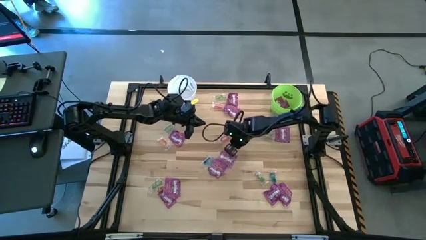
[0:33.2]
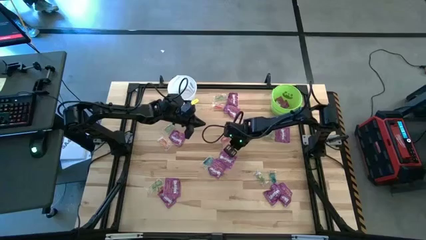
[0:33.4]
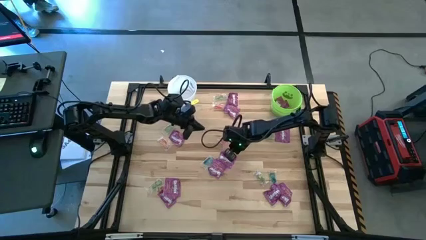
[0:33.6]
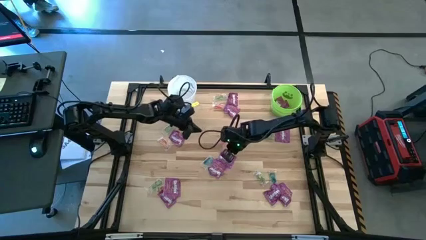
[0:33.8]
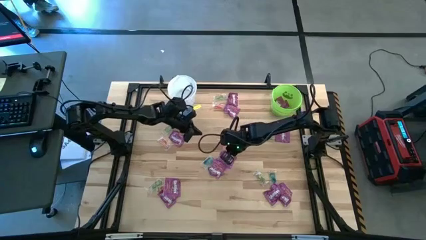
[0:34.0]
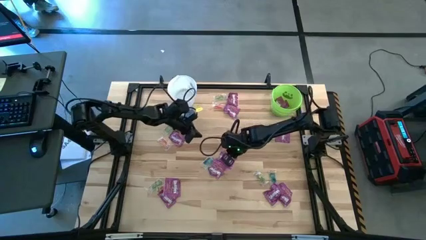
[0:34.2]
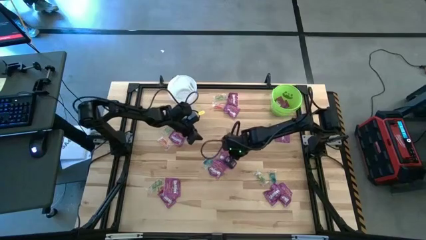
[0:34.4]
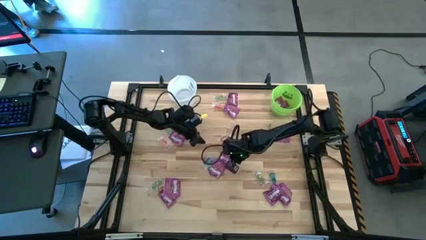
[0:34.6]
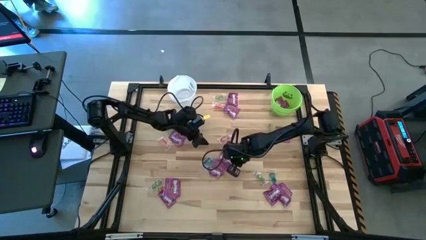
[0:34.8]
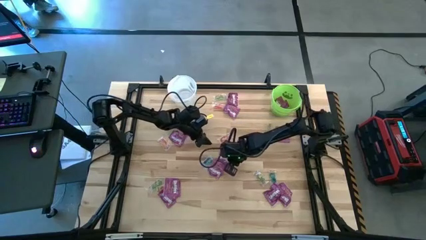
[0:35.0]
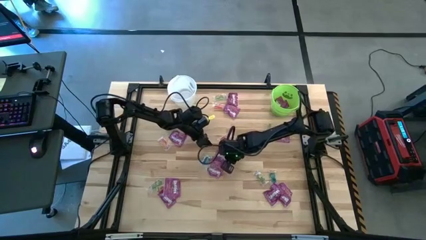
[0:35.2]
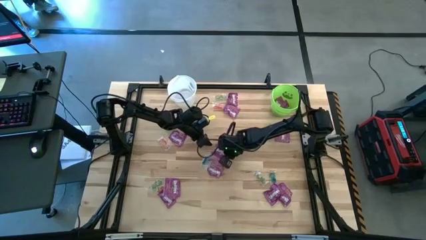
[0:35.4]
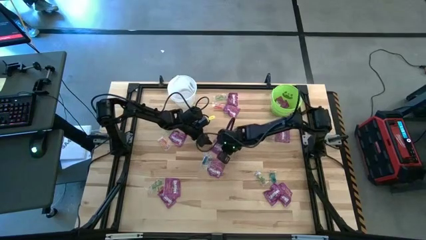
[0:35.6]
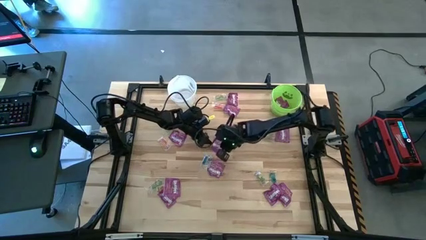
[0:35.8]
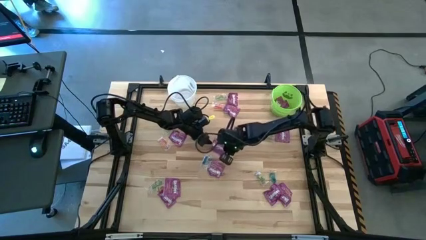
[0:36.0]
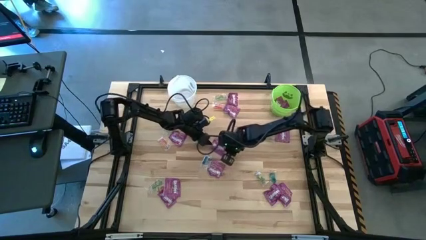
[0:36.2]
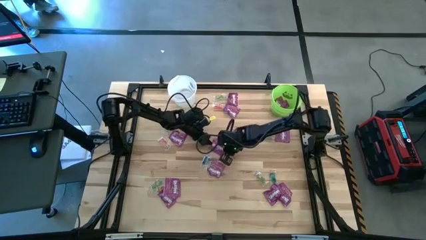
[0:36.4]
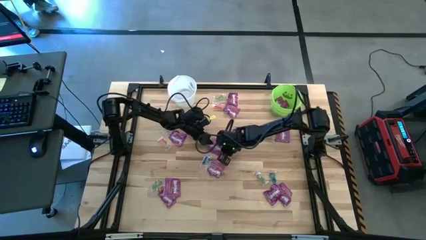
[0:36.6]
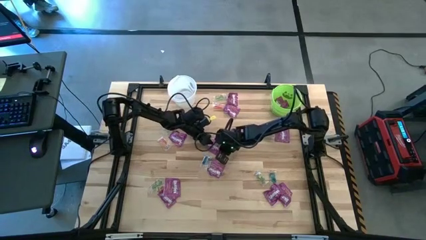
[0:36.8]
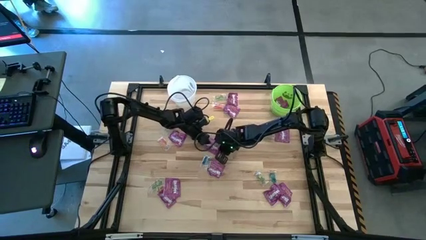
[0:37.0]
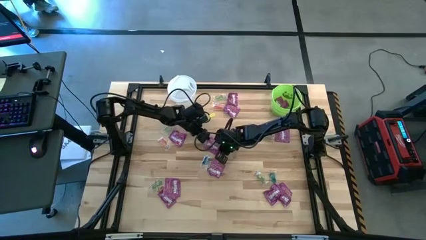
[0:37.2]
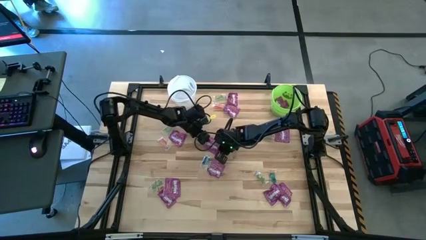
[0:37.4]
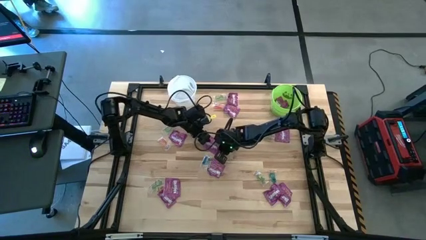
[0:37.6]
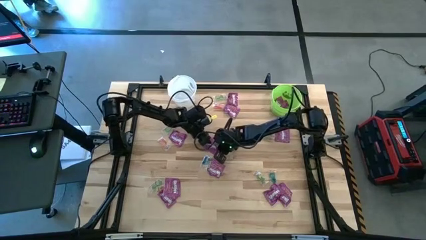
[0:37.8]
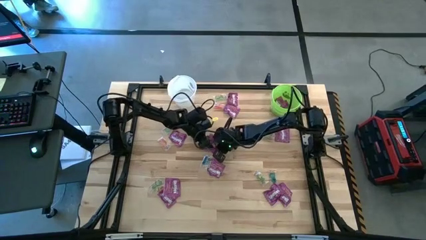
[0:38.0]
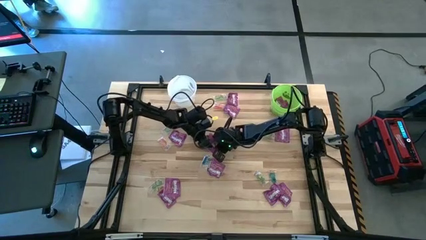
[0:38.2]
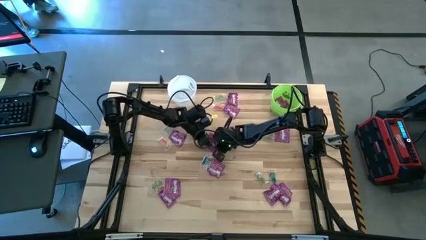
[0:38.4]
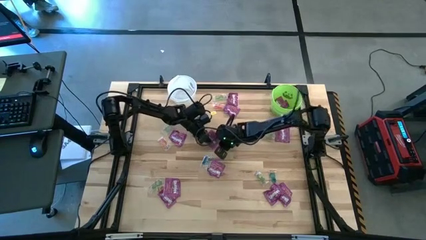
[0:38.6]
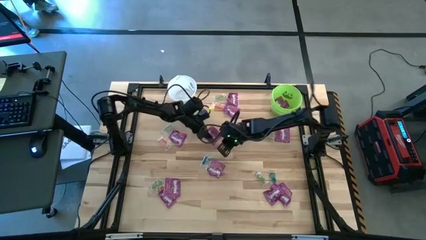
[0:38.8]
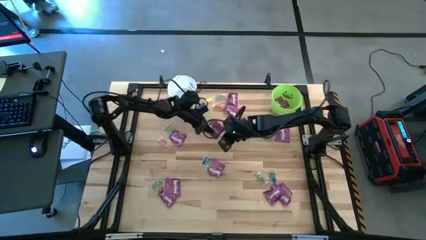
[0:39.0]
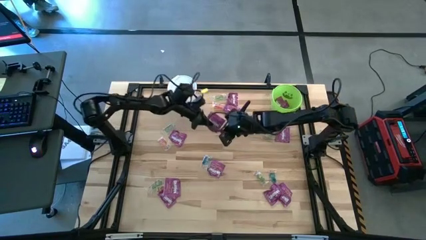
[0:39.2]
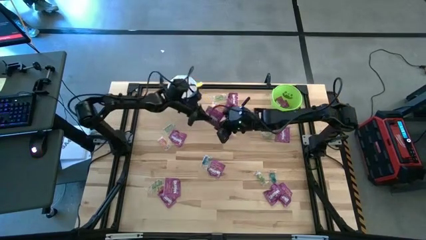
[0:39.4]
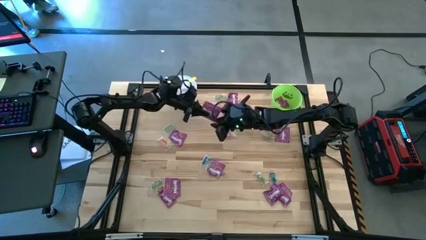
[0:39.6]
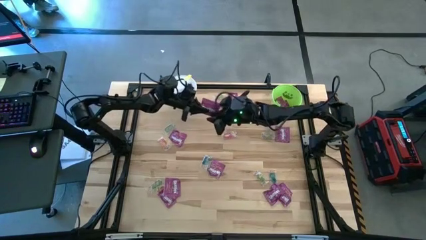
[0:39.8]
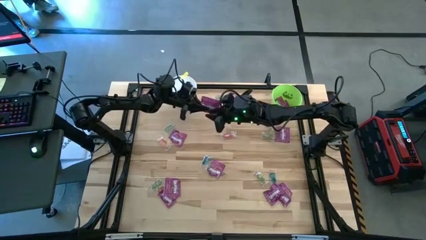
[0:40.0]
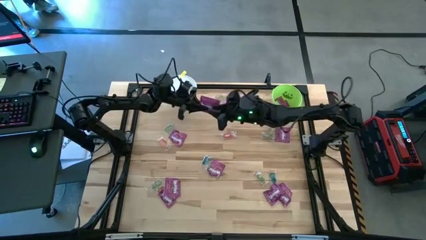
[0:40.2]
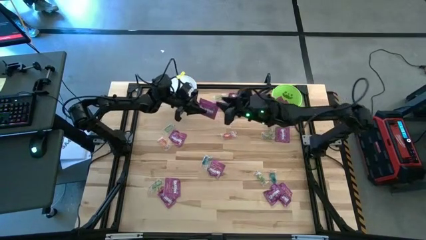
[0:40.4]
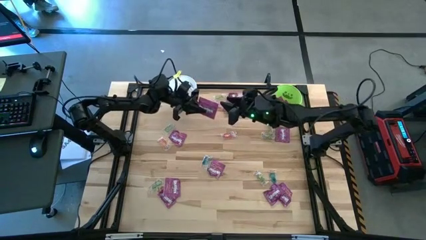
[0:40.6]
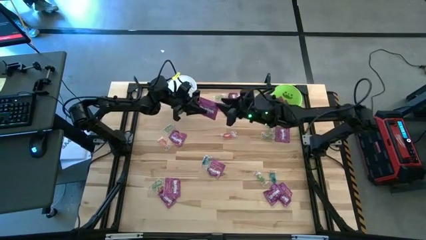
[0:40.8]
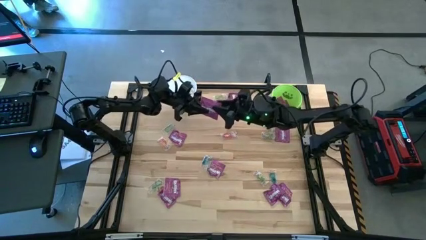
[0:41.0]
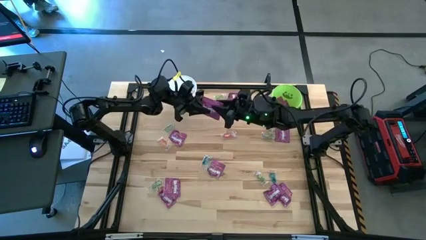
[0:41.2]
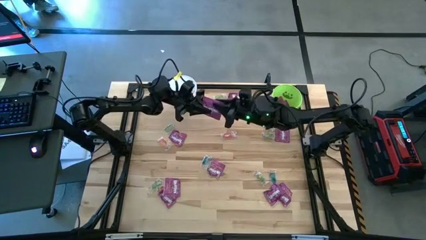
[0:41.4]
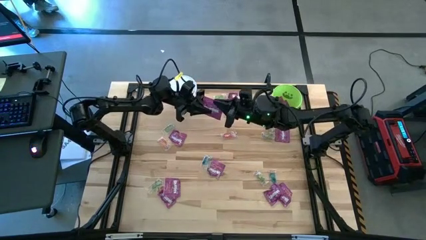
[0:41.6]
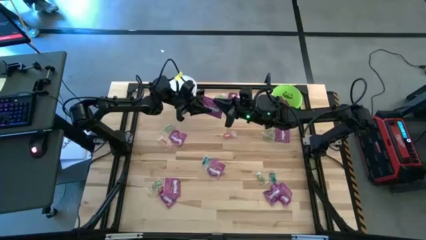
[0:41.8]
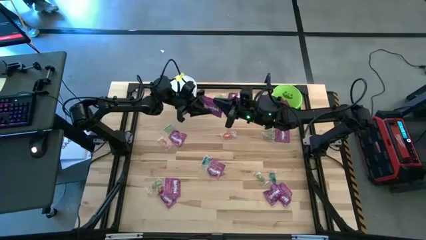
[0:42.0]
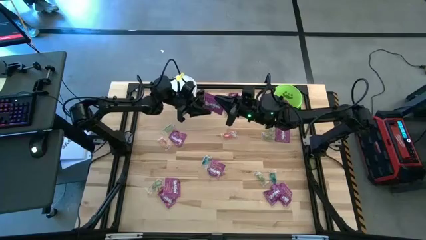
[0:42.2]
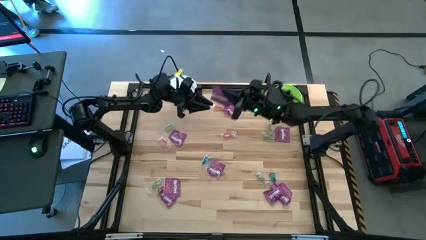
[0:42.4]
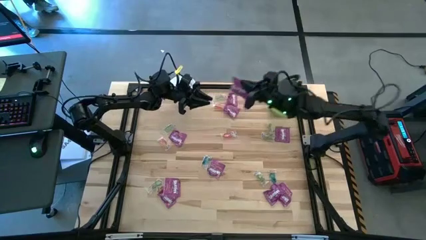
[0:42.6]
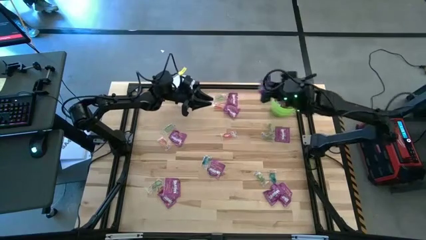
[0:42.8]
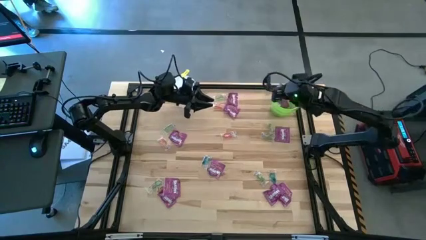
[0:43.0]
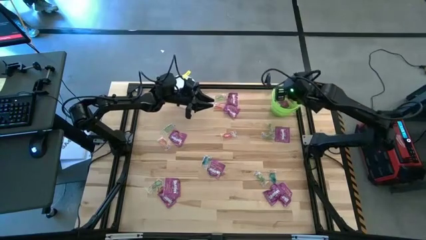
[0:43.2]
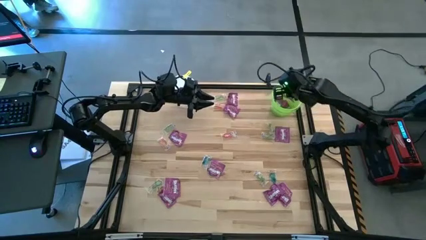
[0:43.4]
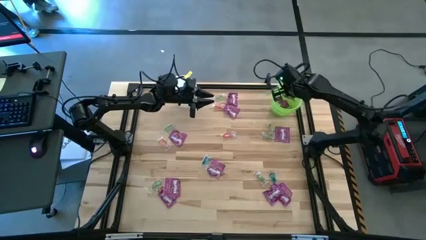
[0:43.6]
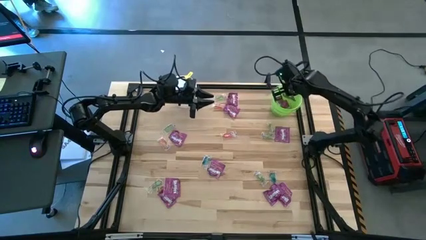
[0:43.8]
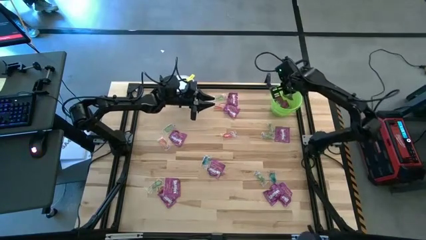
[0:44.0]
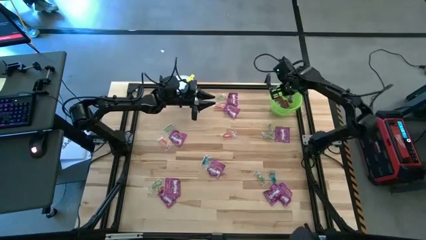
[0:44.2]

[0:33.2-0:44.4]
Task: Sort candy by brand, put in halloween buckets
Put the violet candy into the green bucket

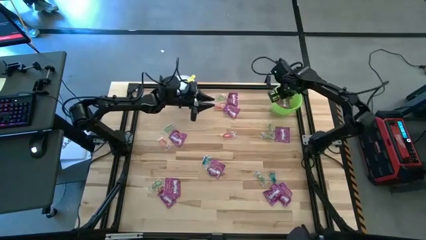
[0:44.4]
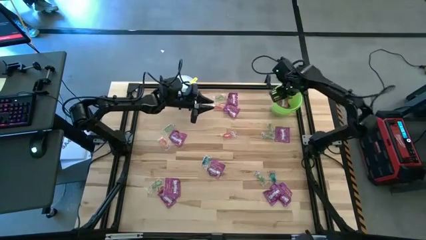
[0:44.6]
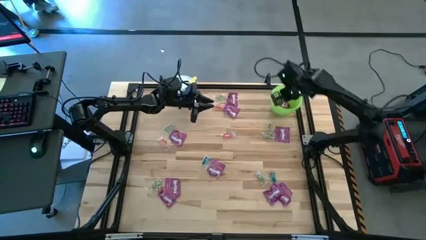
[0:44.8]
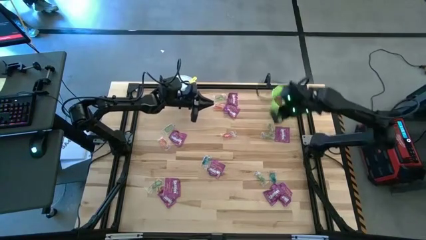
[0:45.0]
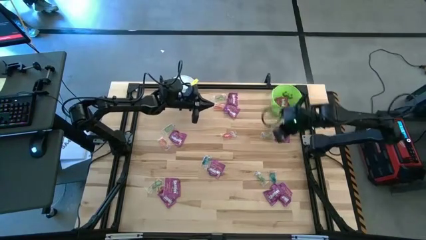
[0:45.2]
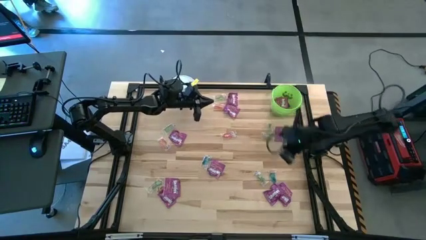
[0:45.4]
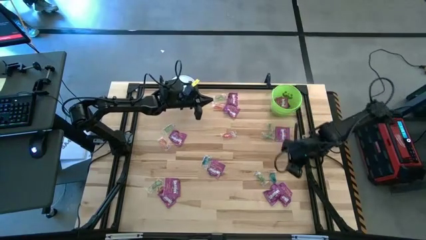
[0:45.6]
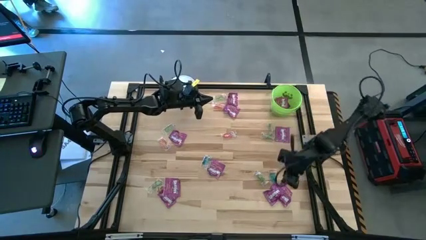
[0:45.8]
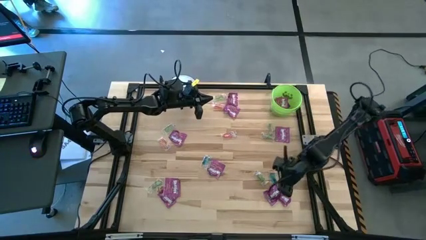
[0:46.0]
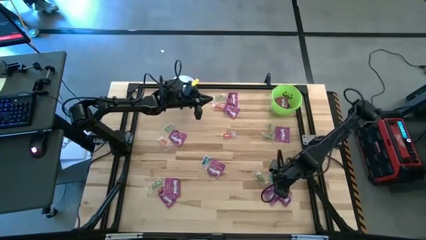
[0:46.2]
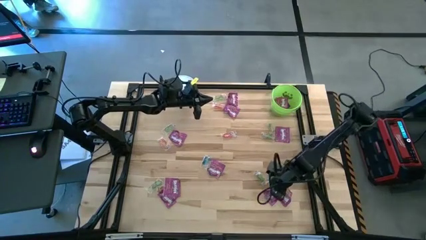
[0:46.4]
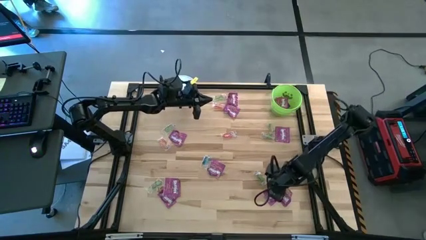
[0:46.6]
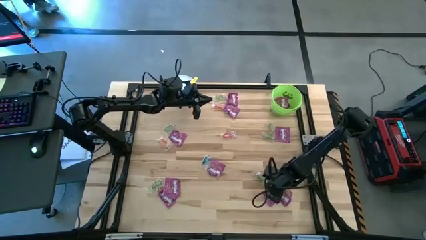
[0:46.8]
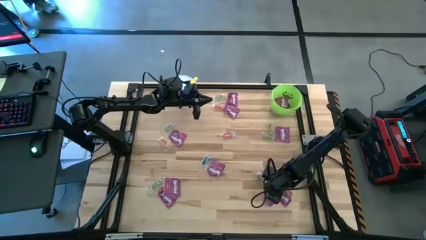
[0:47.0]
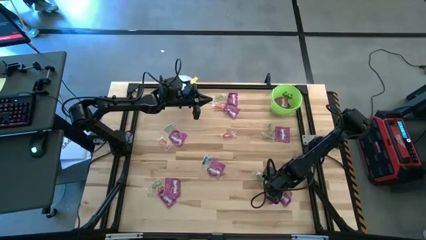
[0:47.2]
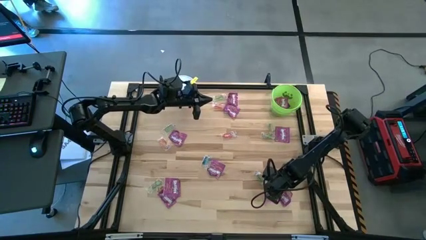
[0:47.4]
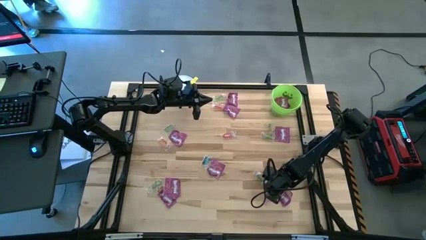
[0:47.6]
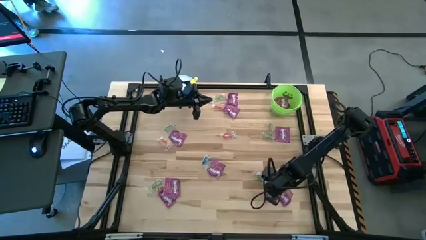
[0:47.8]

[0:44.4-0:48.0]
Put the violet candy into the green bucket

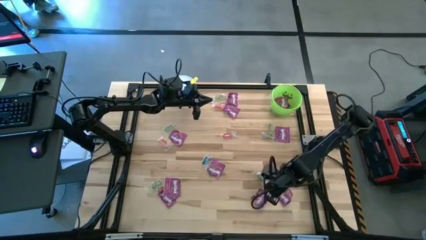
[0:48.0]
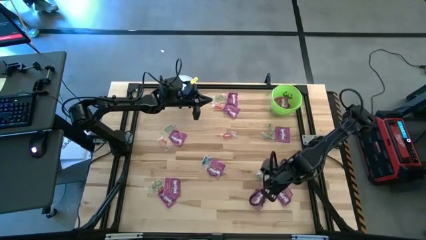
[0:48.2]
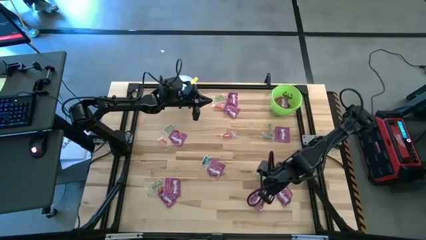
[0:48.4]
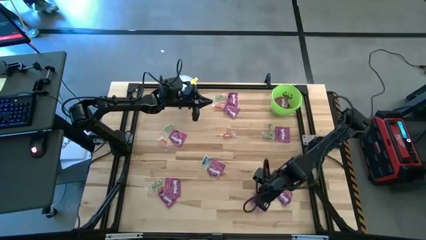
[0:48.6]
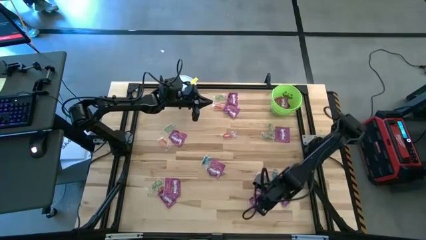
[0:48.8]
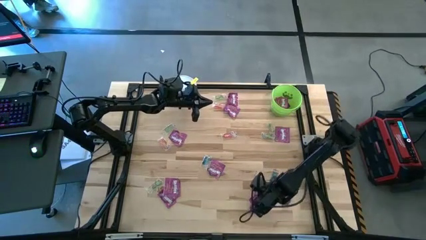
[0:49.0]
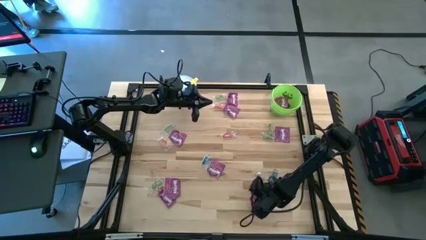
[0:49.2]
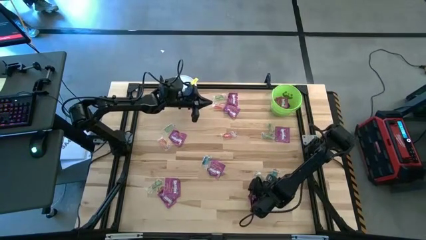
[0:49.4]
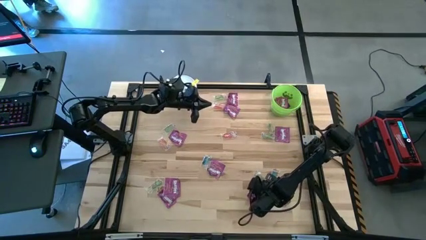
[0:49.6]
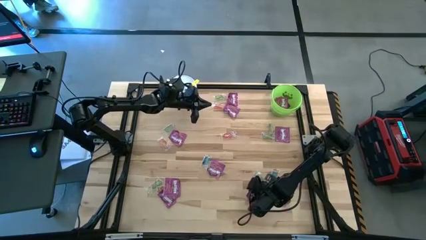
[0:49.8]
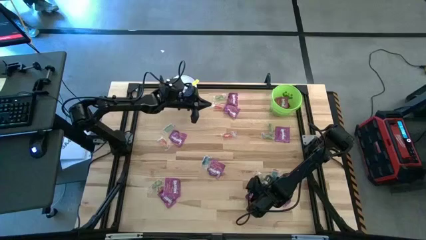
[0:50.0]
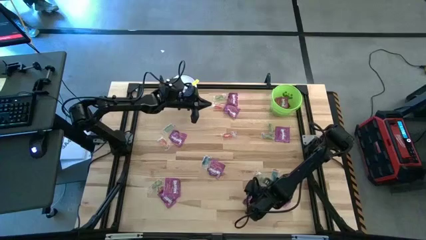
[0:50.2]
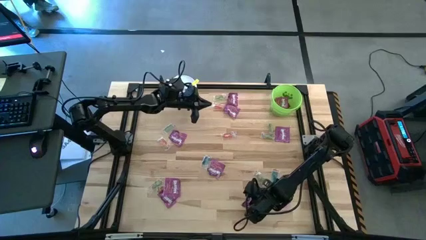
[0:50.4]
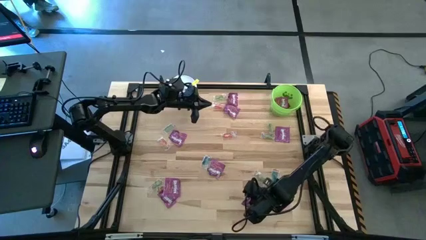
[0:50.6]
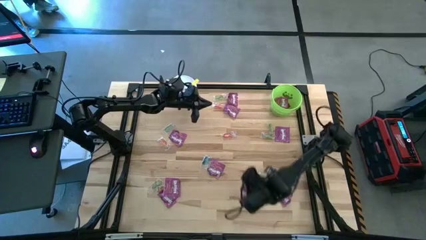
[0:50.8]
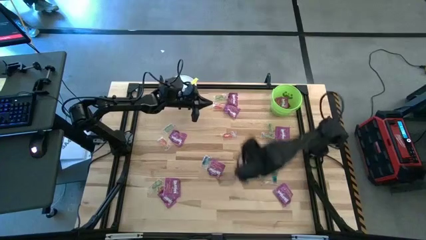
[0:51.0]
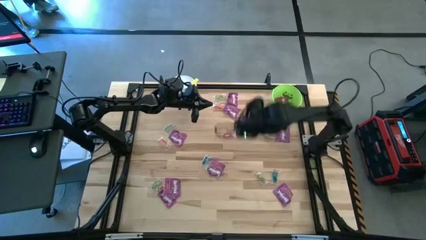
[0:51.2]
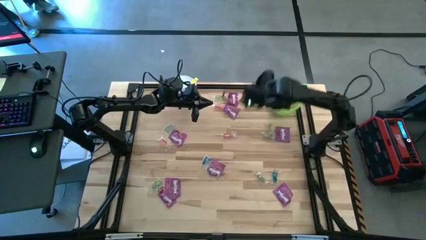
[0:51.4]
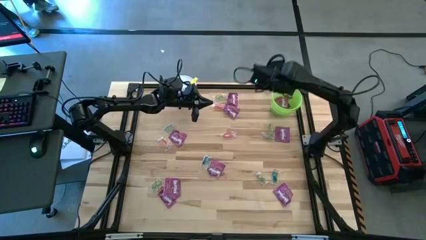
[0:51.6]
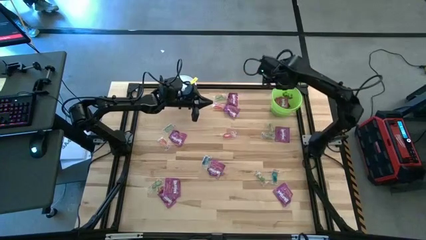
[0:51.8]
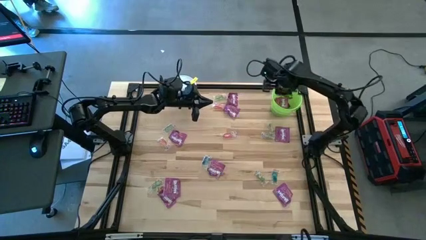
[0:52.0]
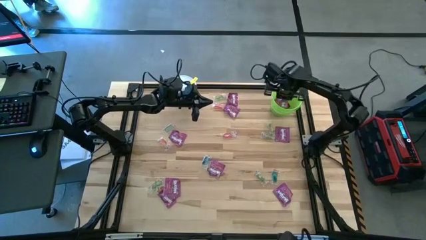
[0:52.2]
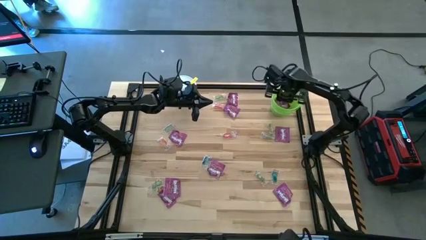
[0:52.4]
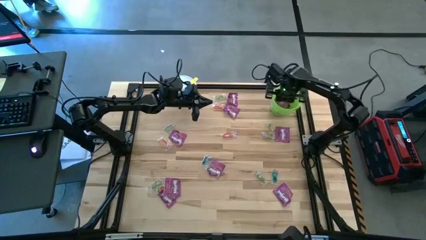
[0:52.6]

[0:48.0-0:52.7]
Put the violet candy into the green bucket
